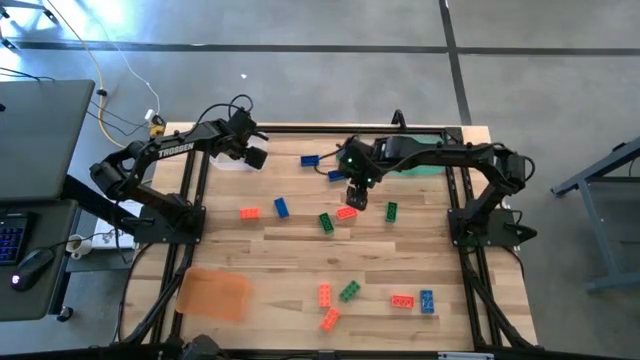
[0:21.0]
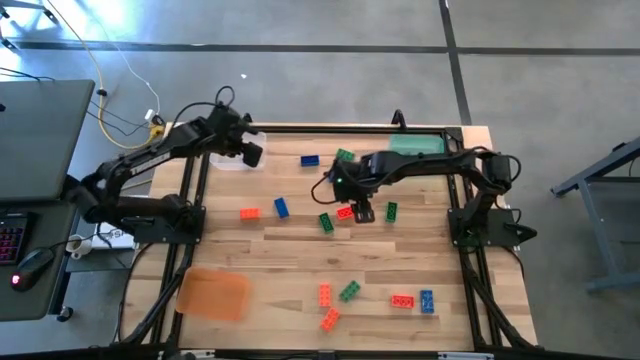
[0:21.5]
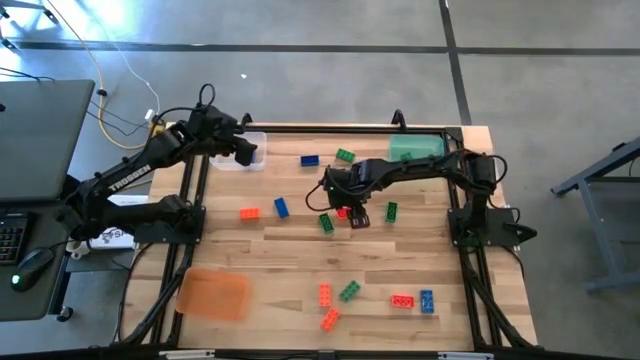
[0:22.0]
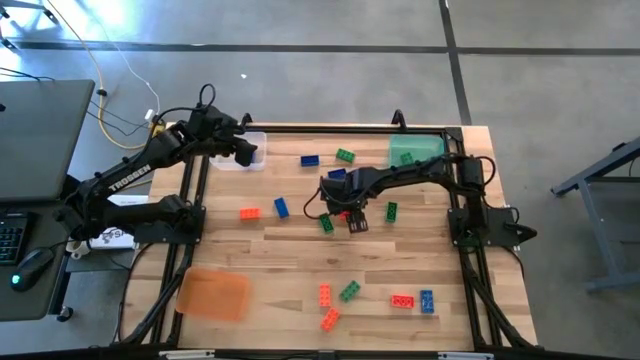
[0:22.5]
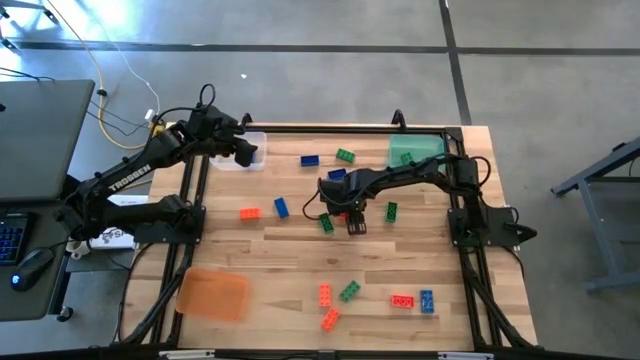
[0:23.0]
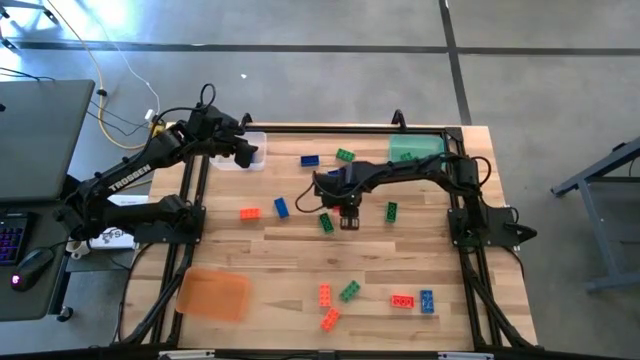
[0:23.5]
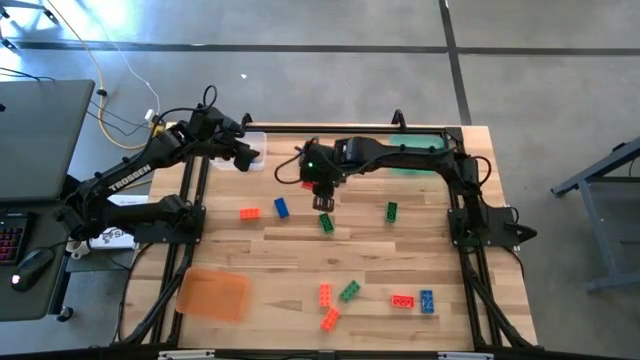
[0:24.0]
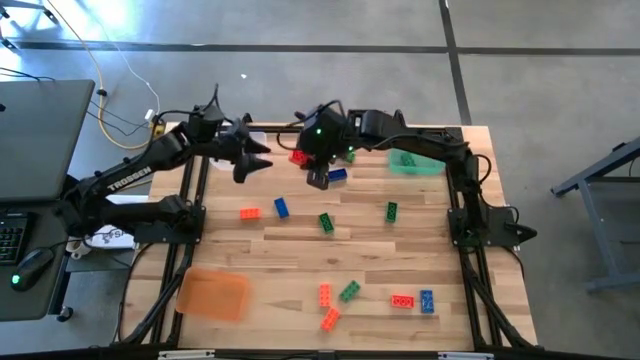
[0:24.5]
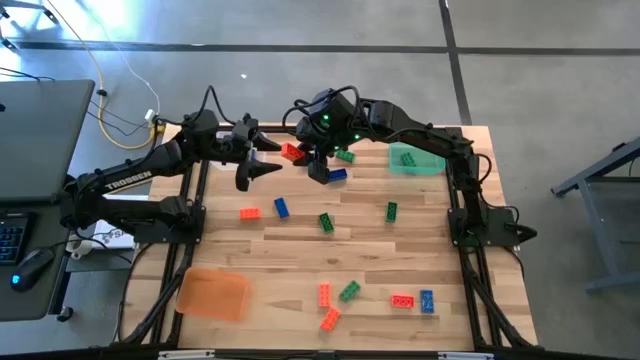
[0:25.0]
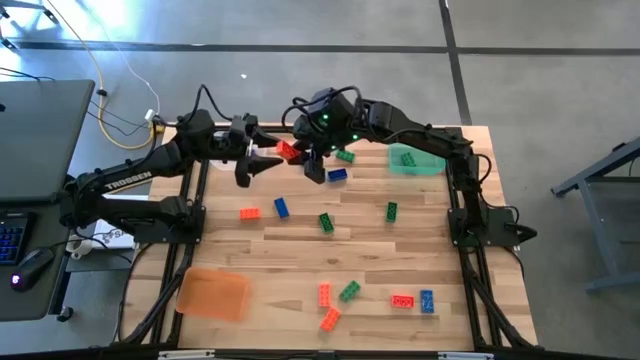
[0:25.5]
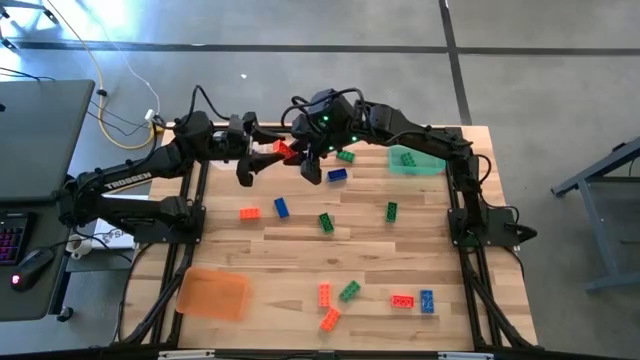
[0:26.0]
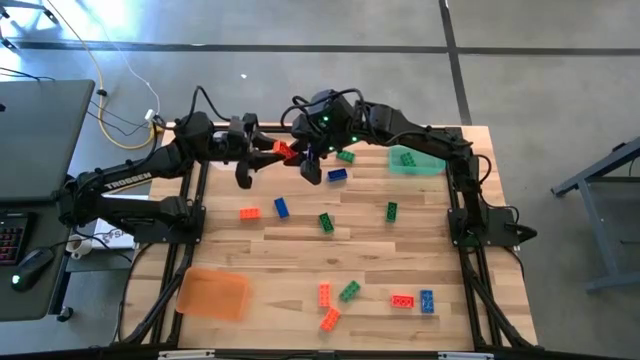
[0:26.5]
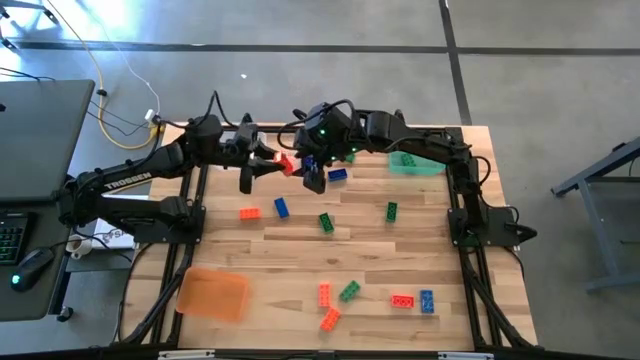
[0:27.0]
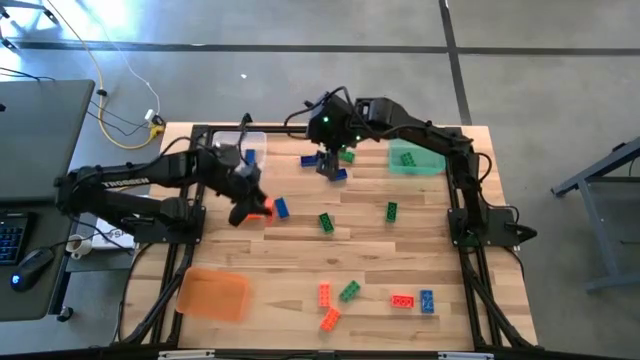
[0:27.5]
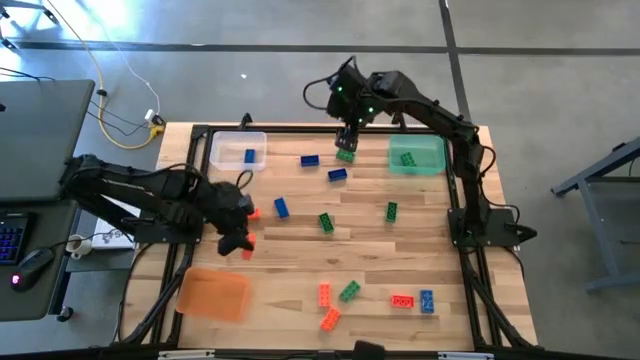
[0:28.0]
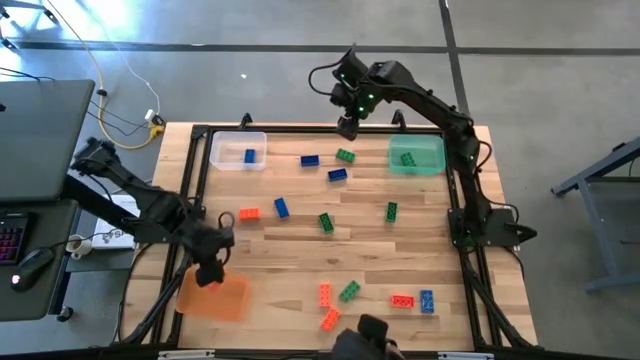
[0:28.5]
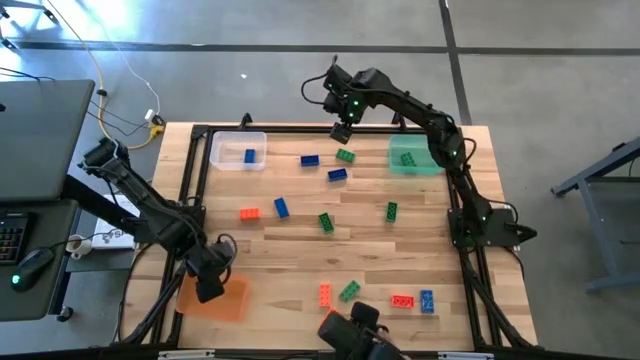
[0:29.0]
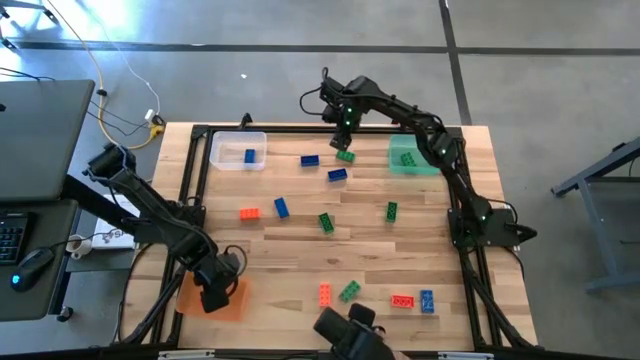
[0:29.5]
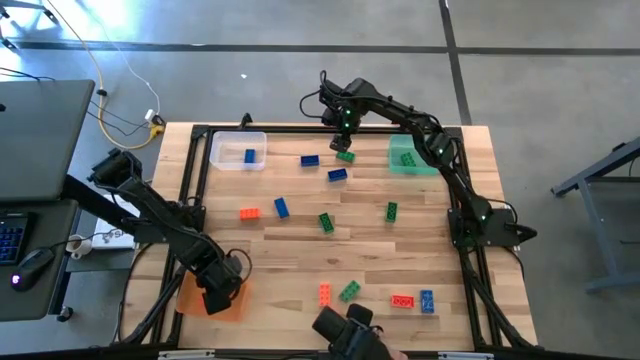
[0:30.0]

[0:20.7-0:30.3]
Task: Sort & place blocks by color
Put the orange game piece into the orange bin

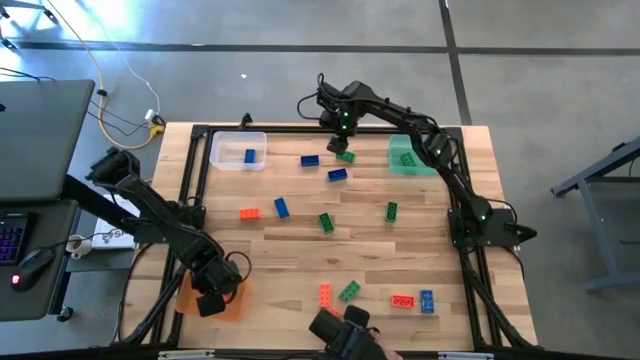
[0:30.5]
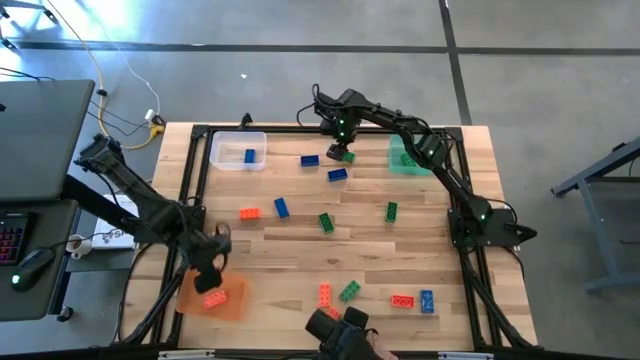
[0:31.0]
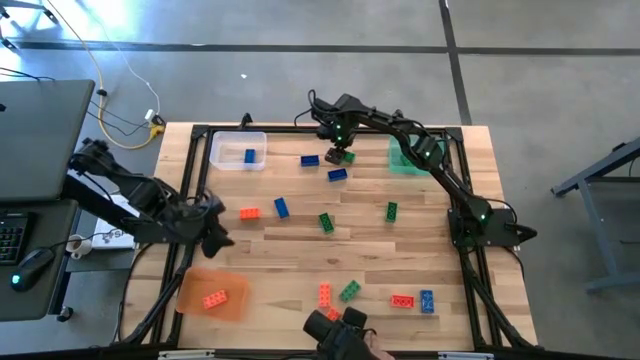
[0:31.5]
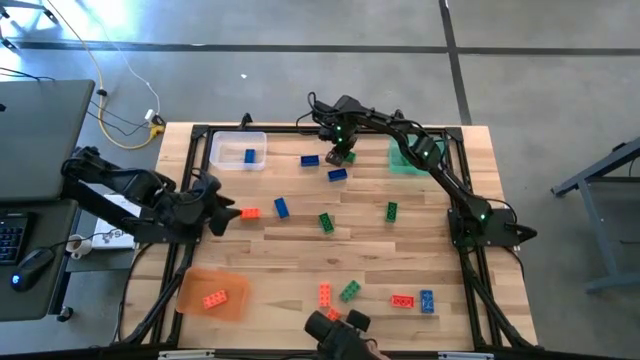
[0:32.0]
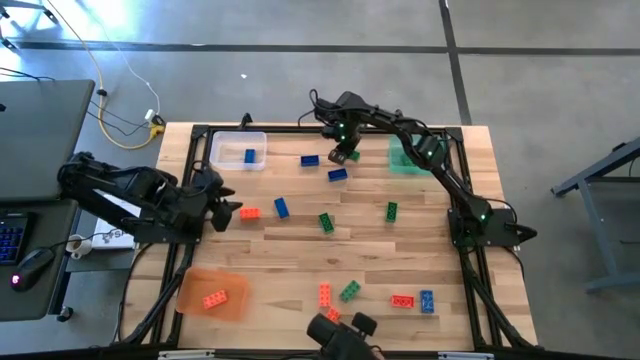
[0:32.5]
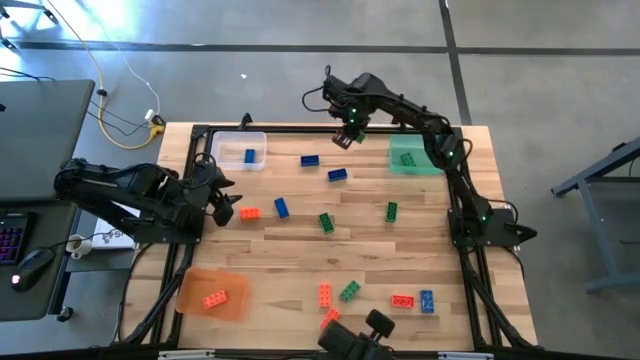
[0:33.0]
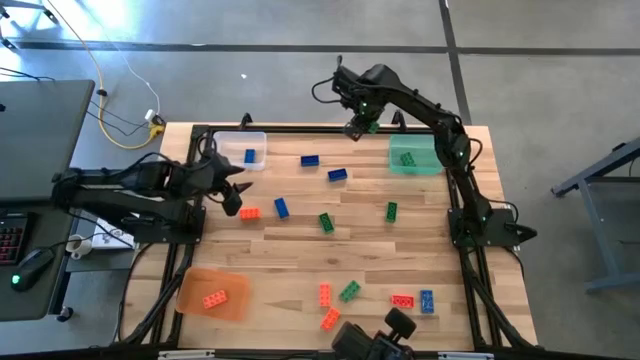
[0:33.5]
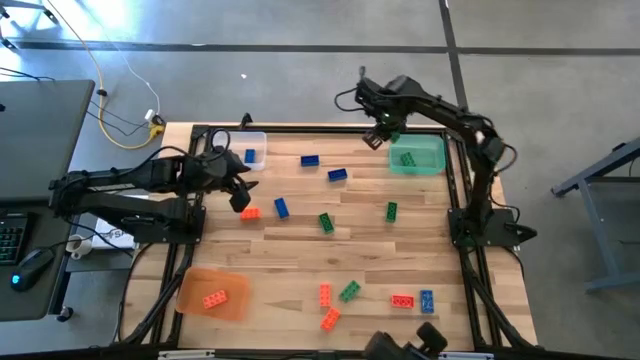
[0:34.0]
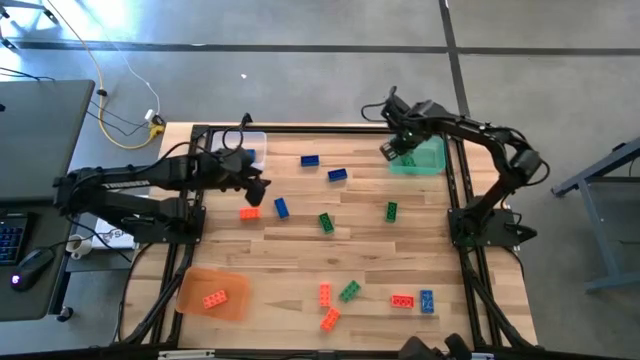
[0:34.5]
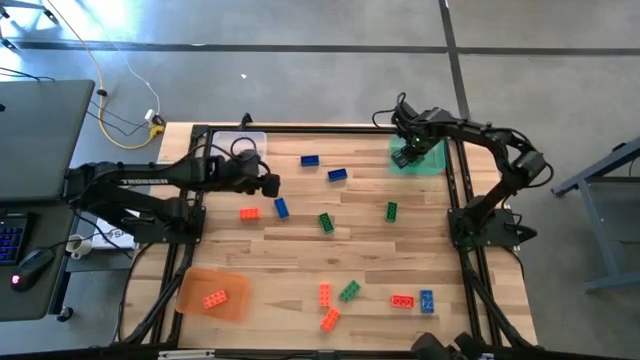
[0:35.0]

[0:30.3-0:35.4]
Put the green game piece into the green bin

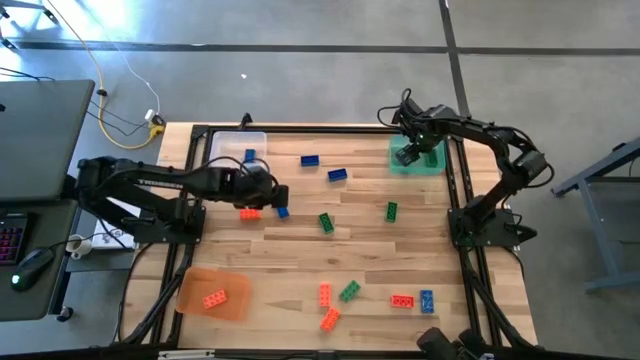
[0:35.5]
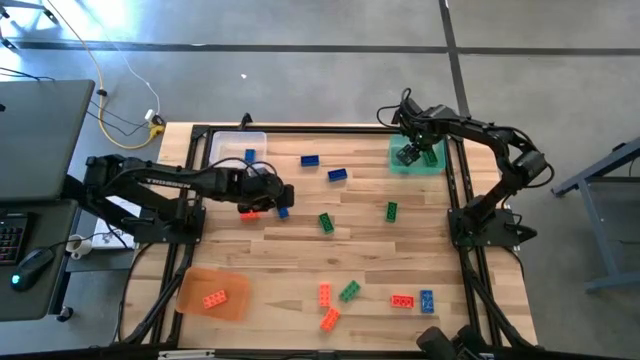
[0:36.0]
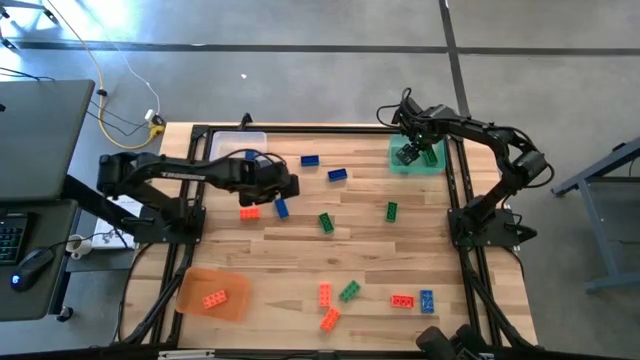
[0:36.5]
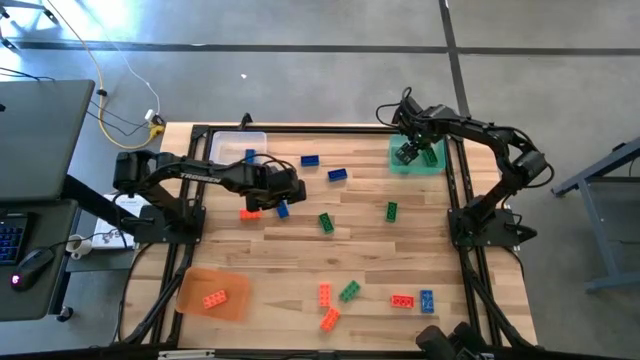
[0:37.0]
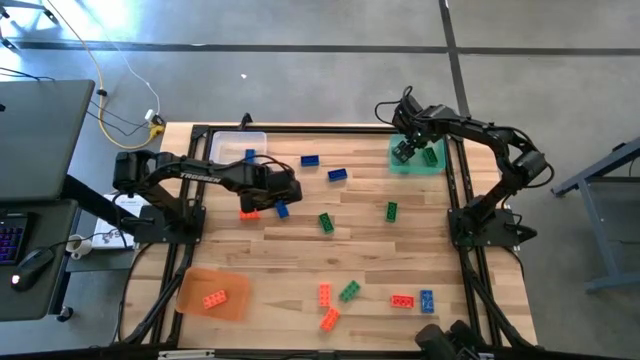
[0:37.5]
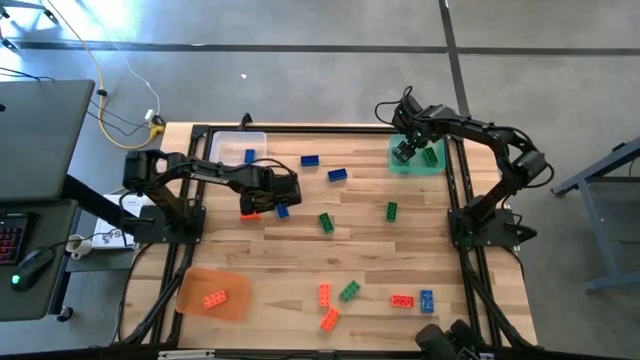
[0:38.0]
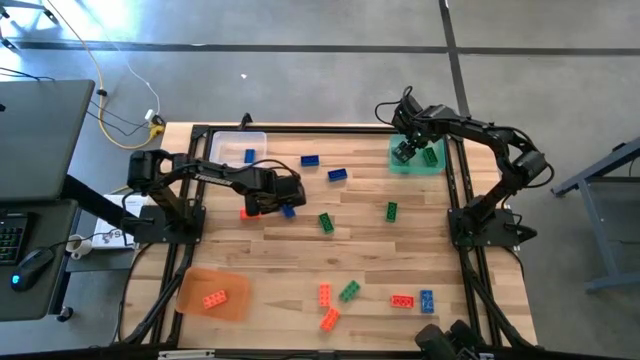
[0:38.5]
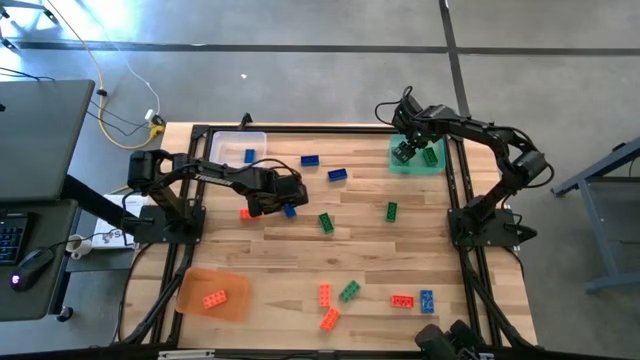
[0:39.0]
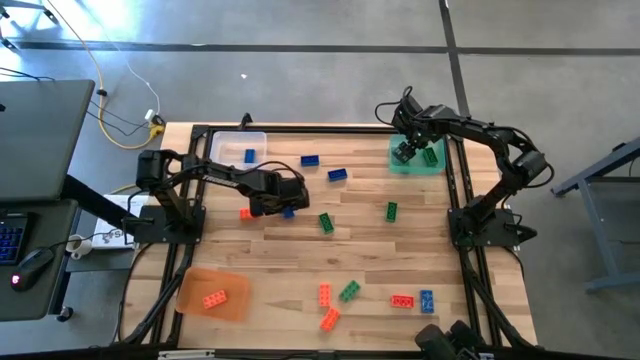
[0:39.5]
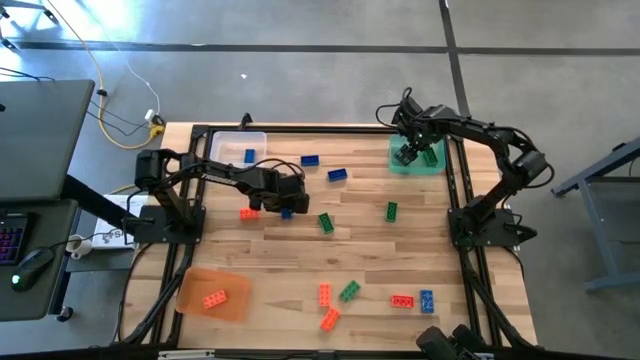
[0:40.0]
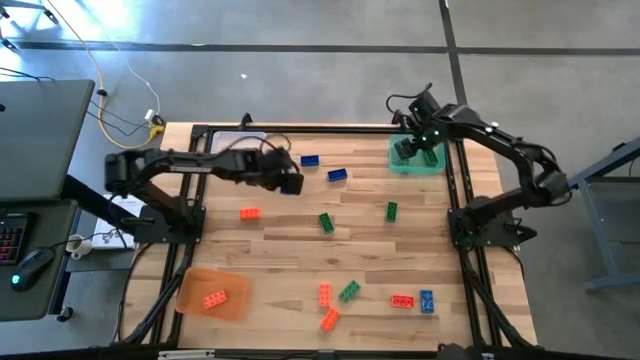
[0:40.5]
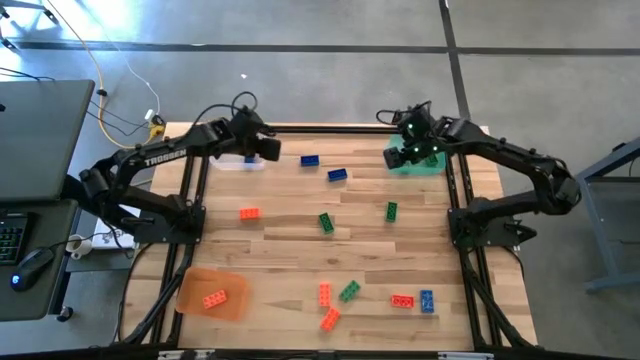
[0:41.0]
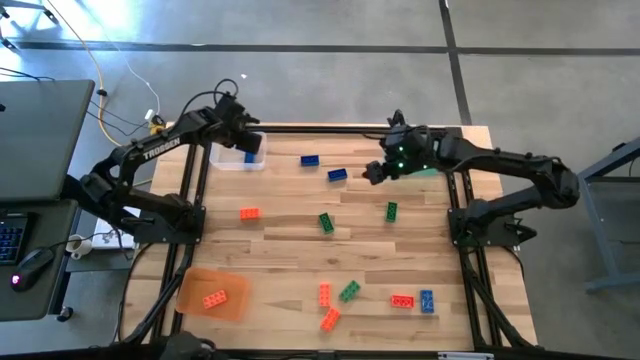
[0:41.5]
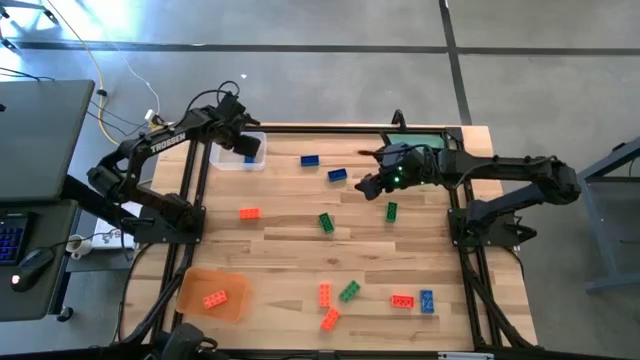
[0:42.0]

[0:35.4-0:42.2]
Put the blue game piece into the transparent bin
